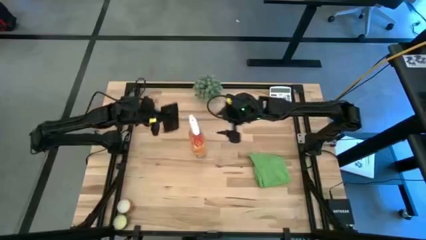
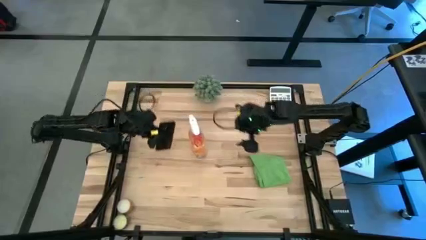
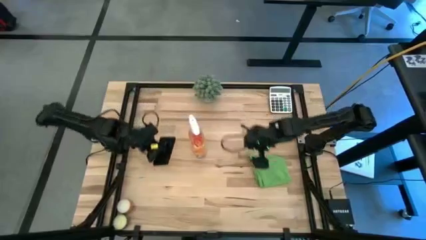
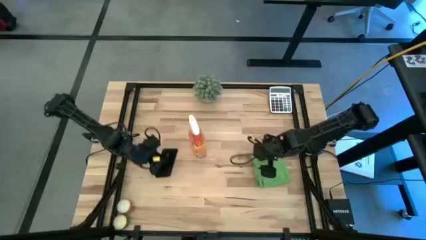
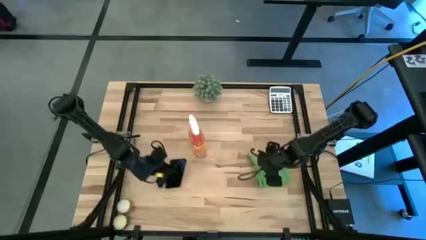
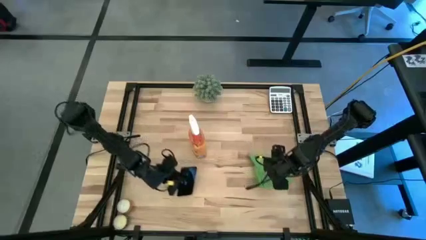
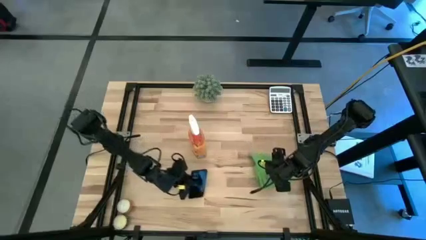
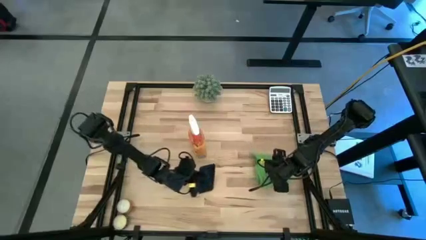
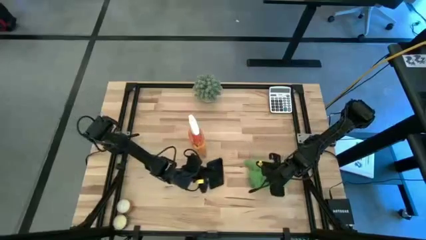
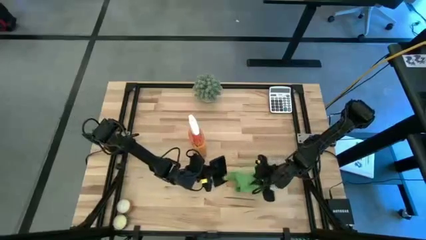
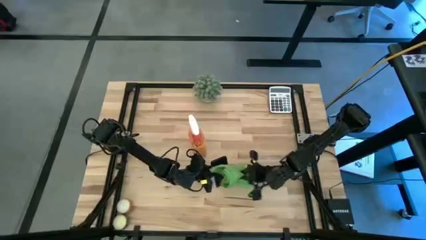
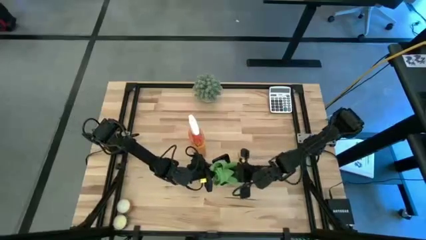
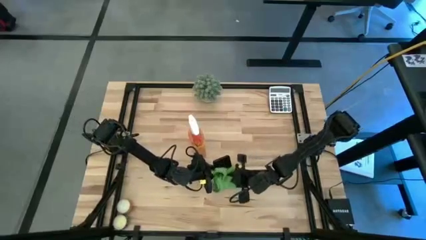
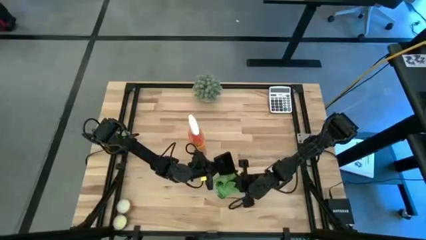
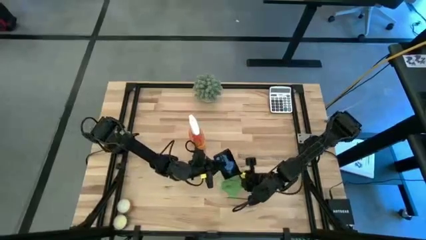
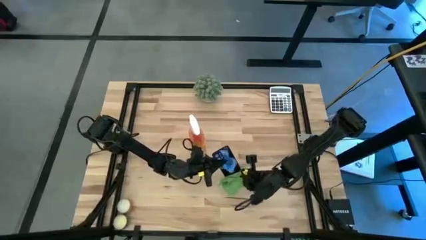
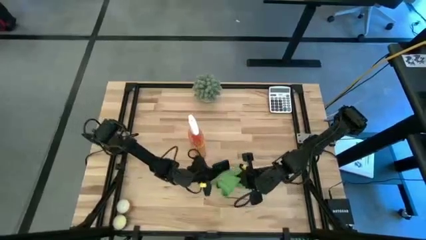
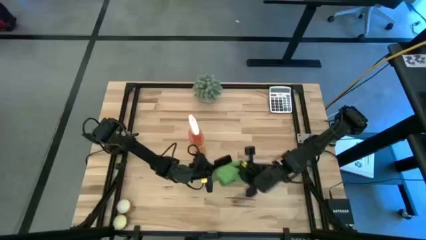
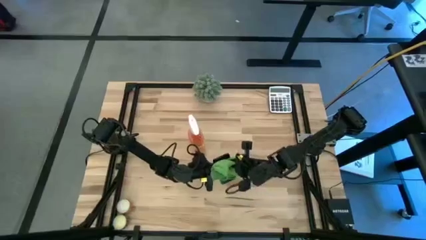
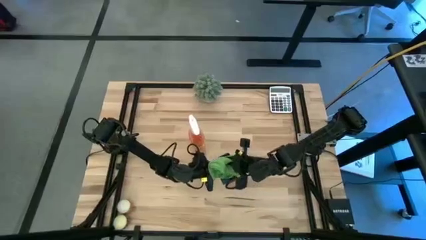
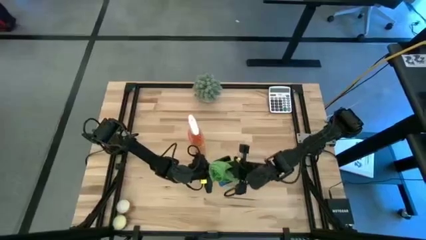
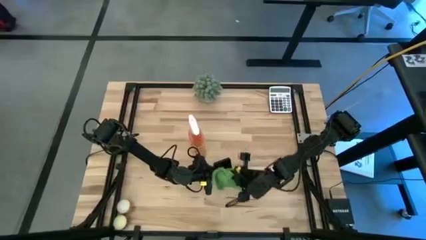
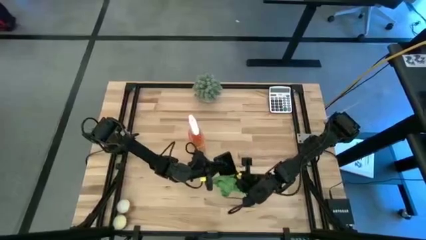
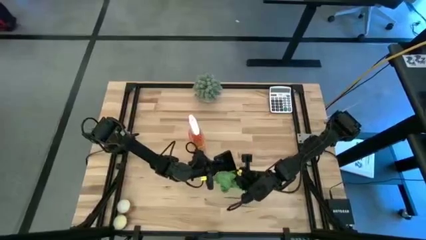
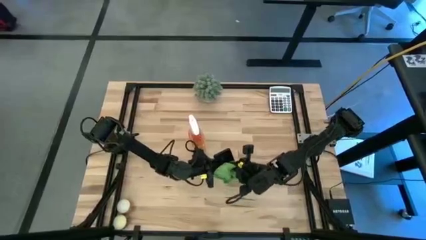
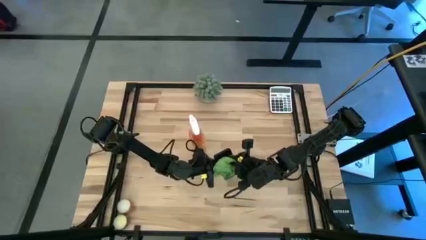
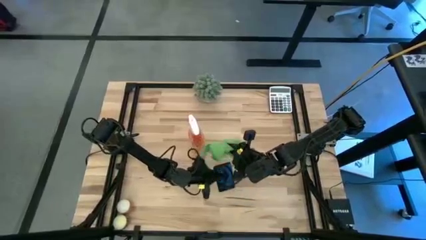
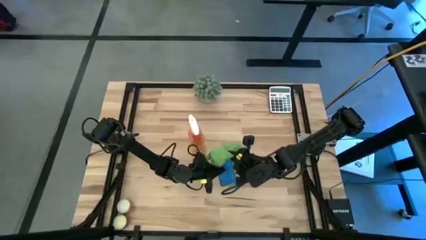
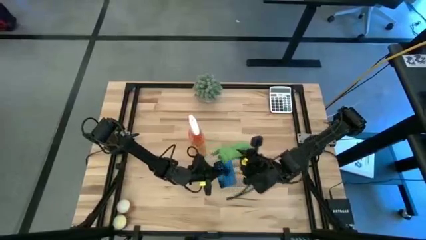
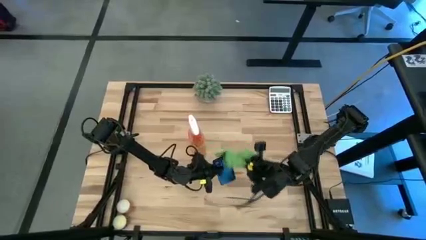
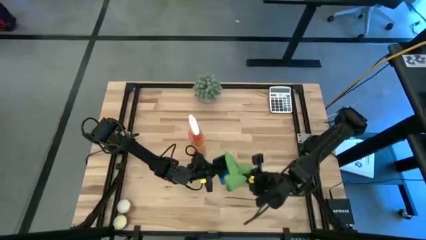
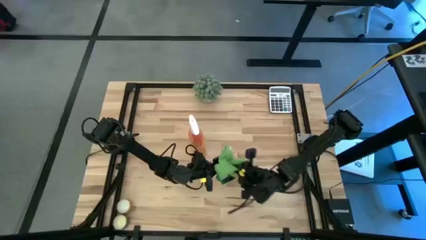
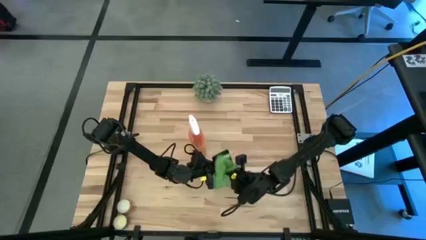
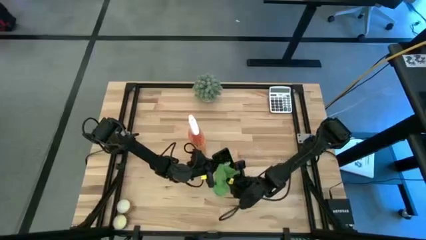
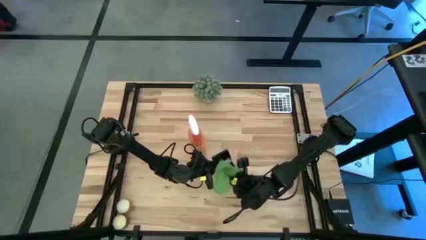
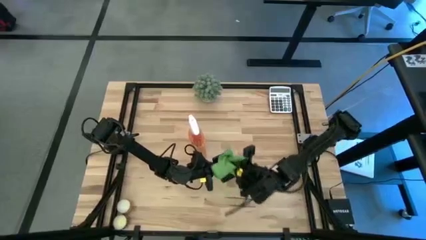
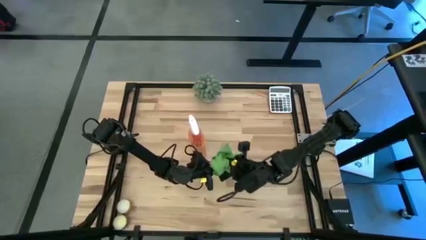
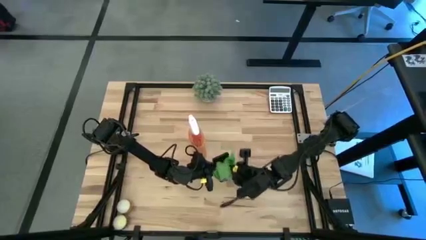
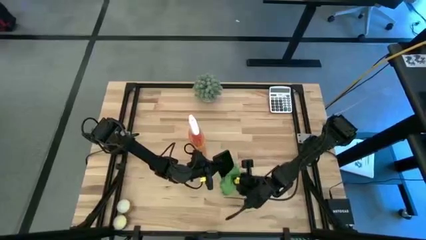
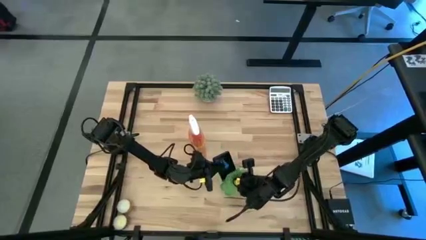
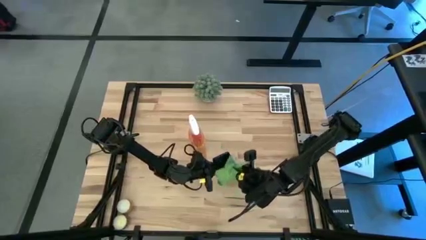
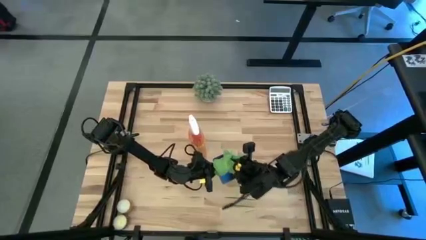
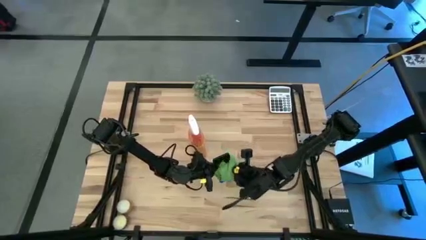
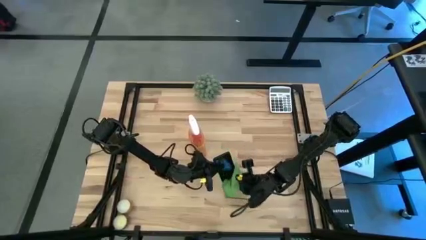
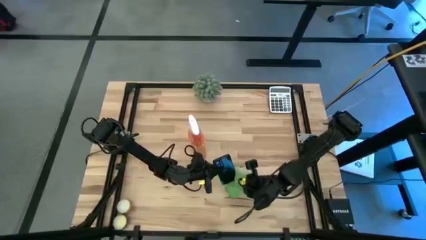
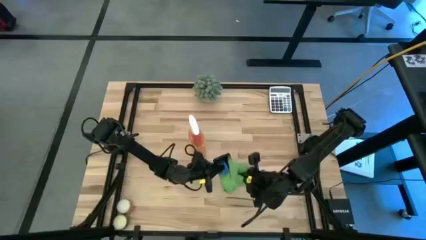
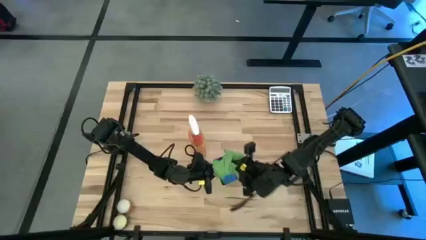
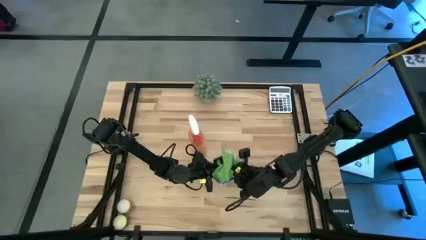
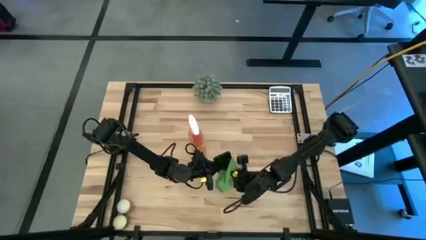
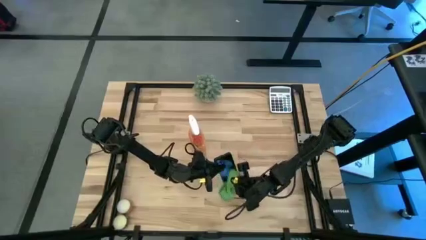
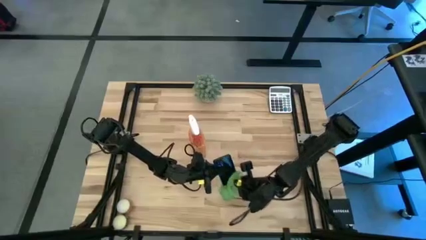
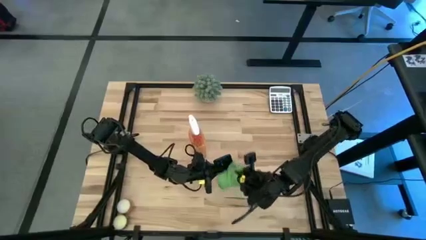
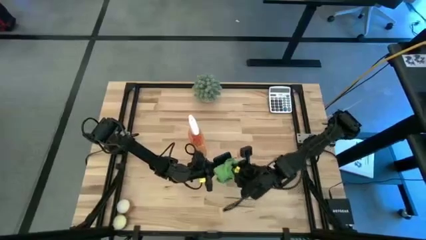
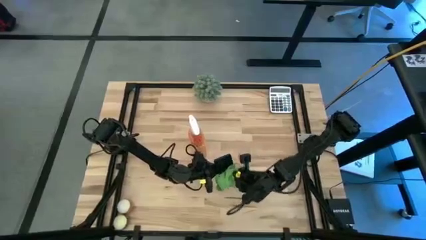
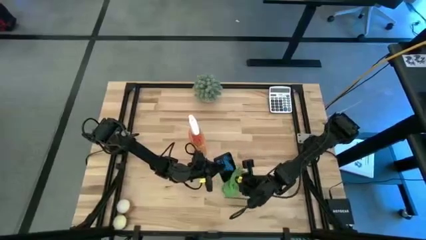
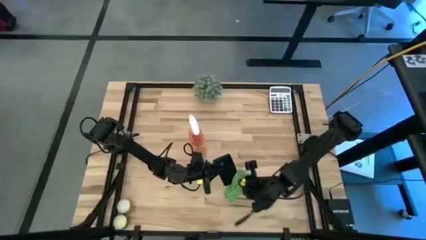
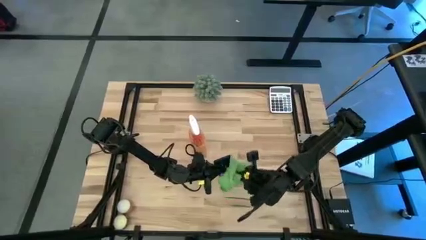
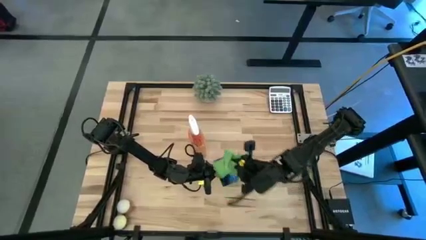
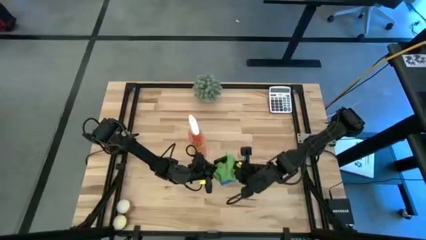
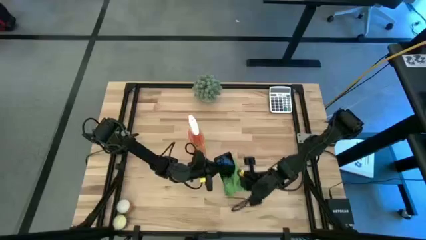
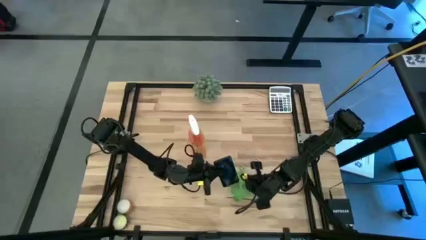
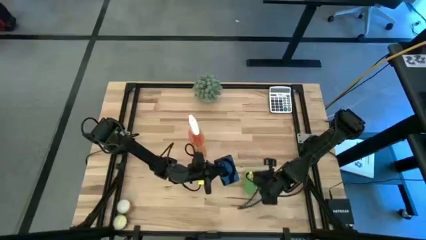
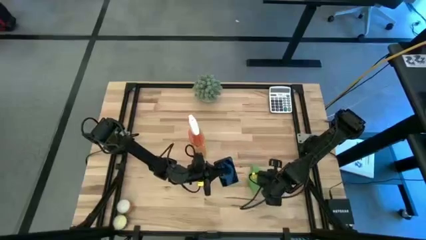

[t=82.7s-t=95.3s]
Task: Apply microfiber cloth
Wipe the back of the black cellphone using the green microfiber cloth

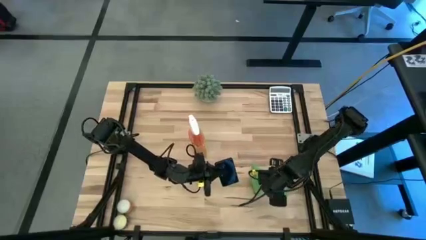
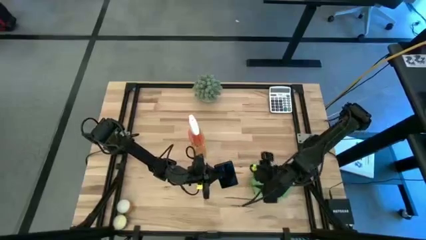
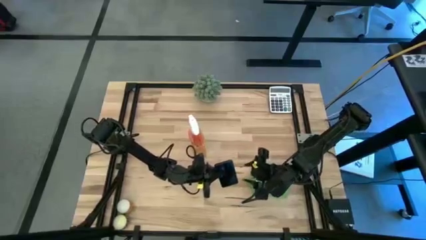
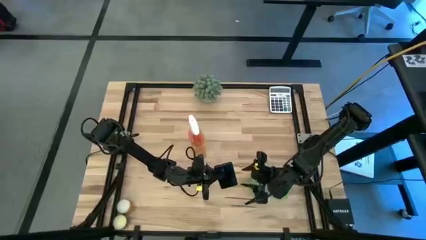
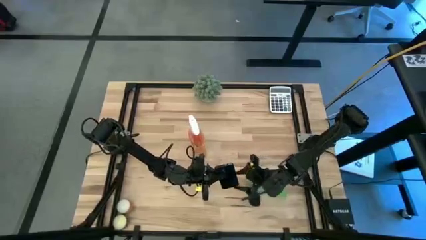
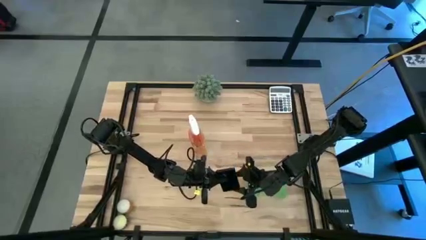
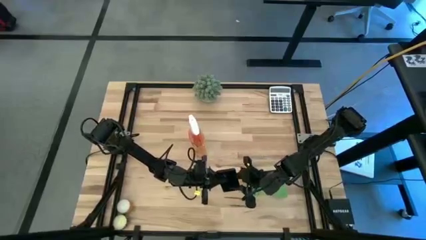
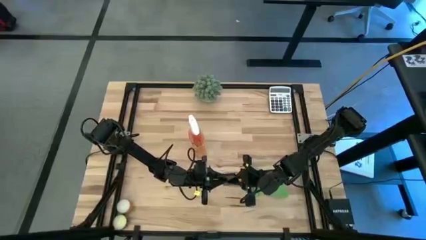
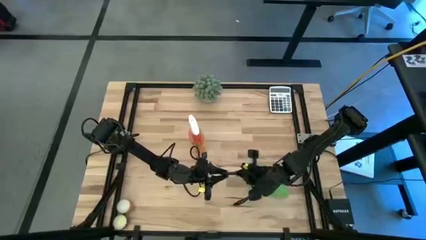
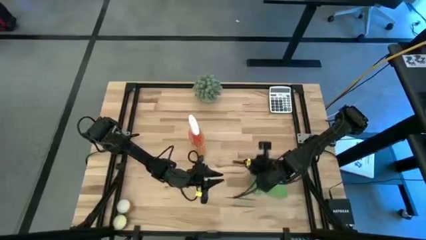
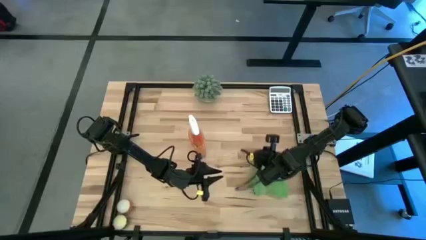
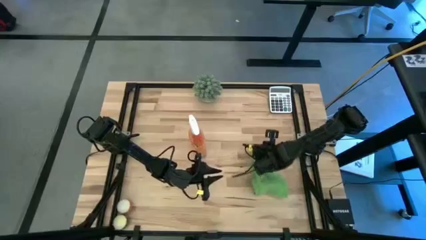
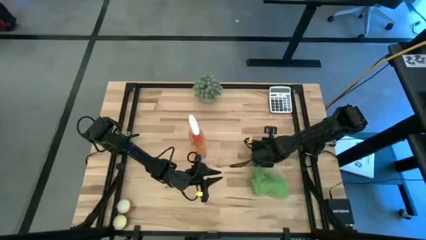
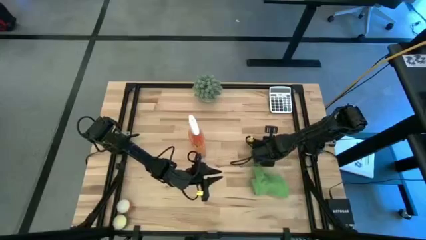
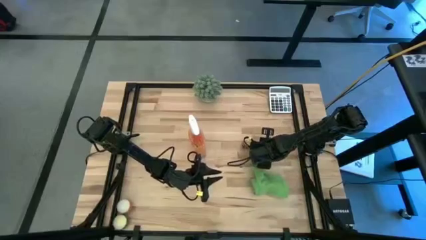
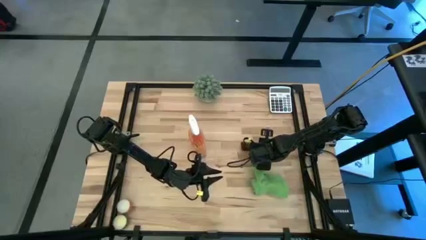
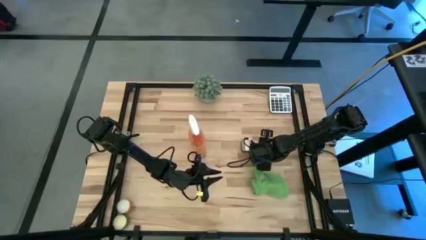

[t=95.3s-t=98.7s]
Put the black cellphone down on the table
